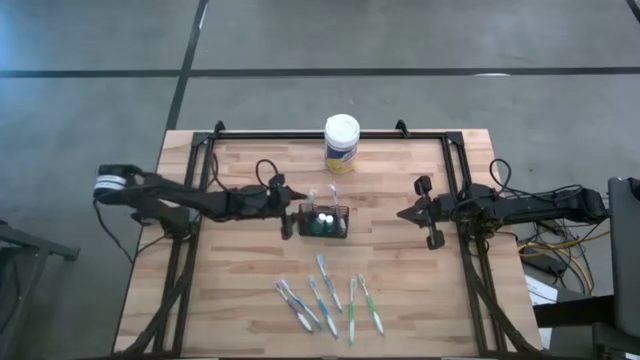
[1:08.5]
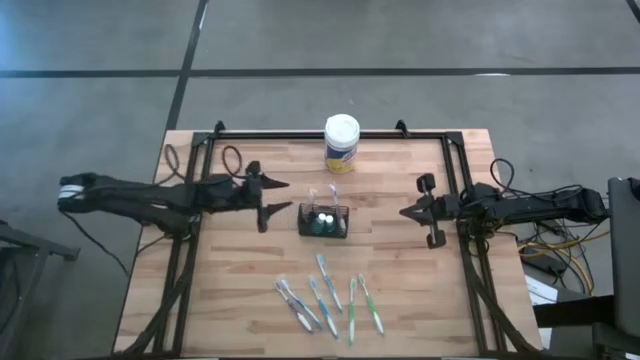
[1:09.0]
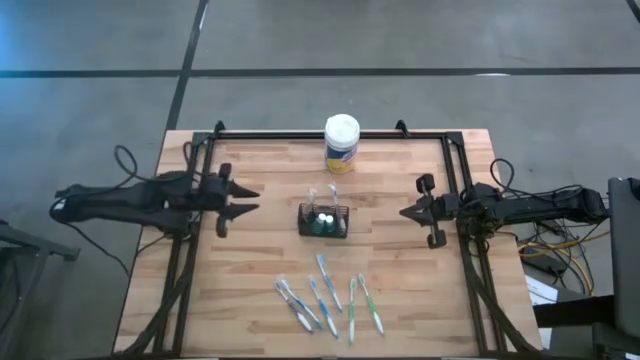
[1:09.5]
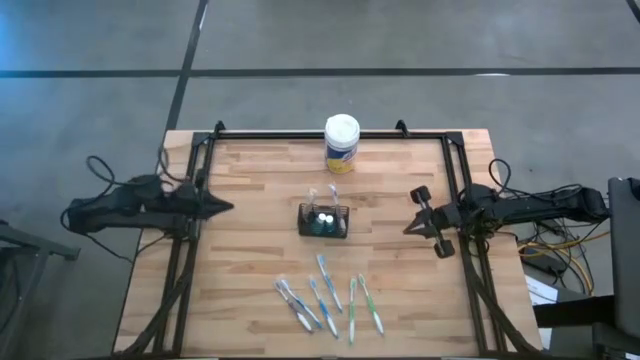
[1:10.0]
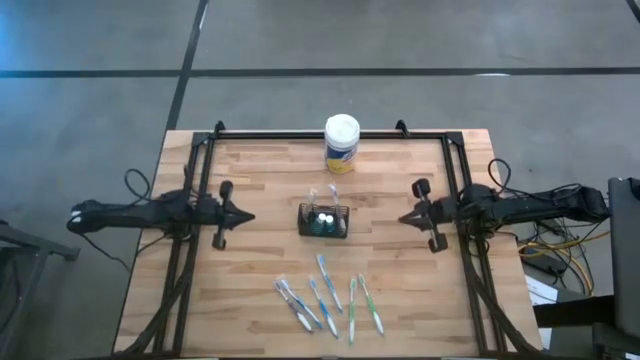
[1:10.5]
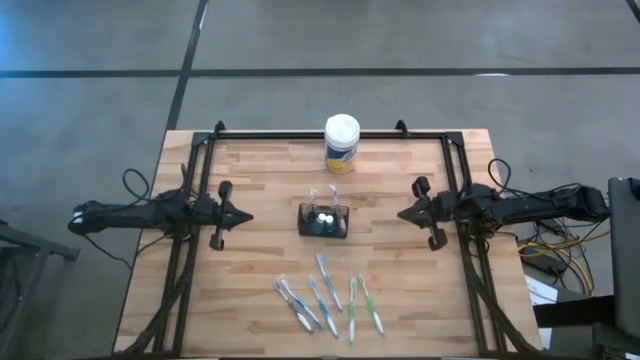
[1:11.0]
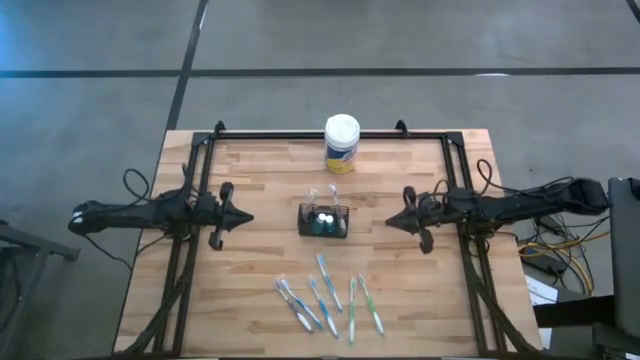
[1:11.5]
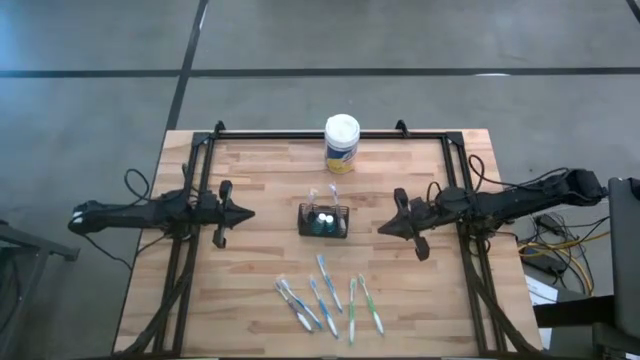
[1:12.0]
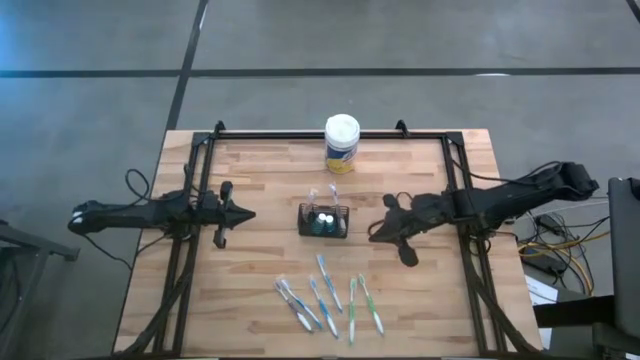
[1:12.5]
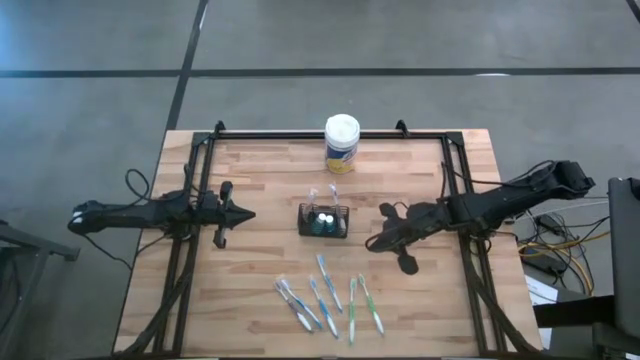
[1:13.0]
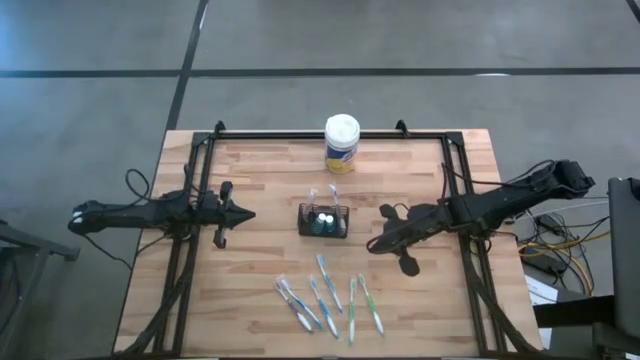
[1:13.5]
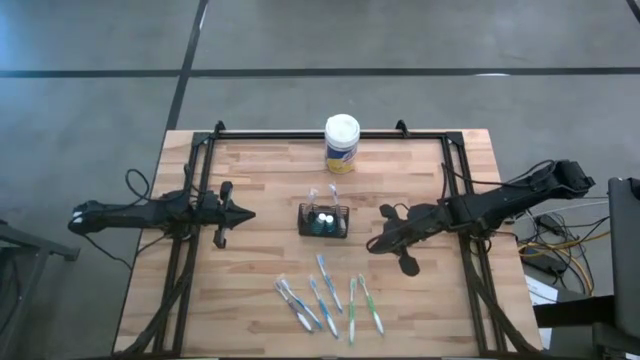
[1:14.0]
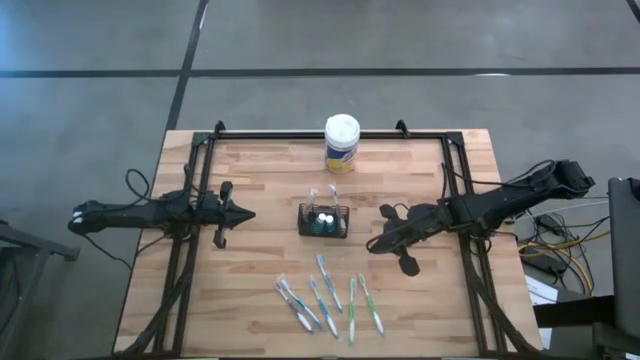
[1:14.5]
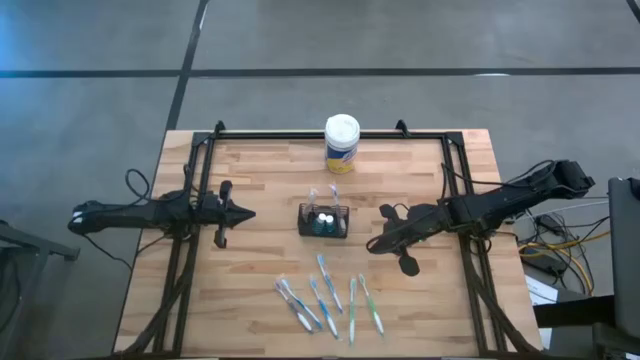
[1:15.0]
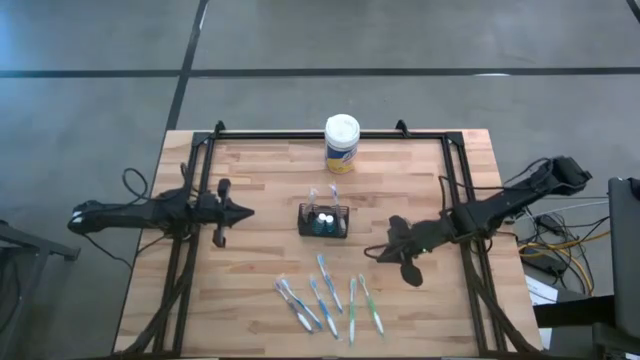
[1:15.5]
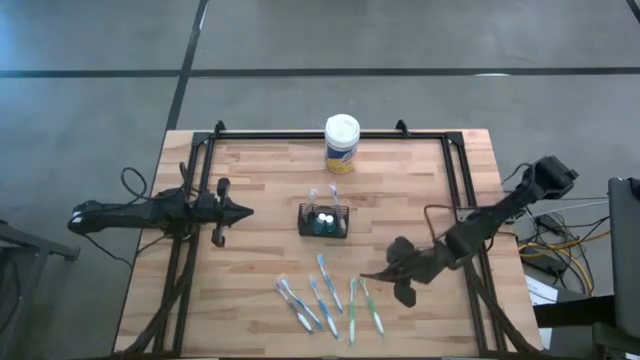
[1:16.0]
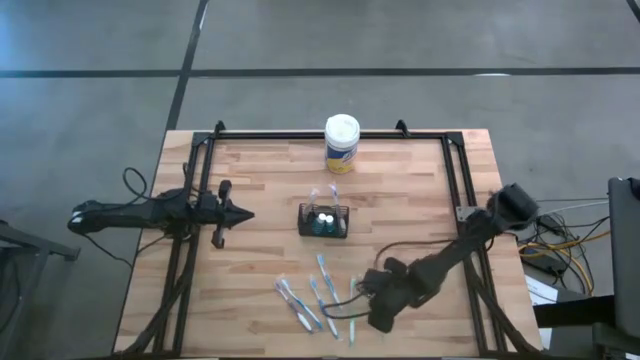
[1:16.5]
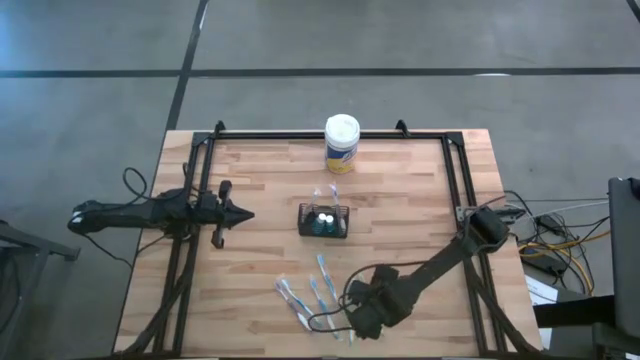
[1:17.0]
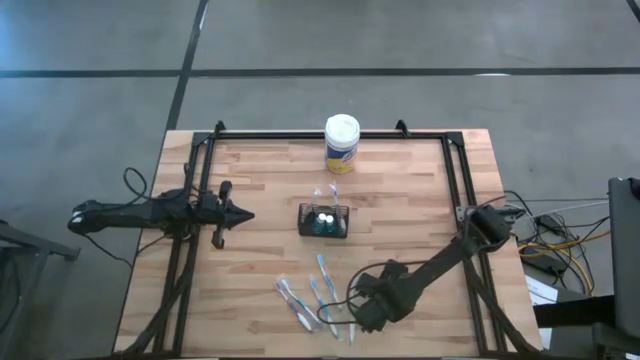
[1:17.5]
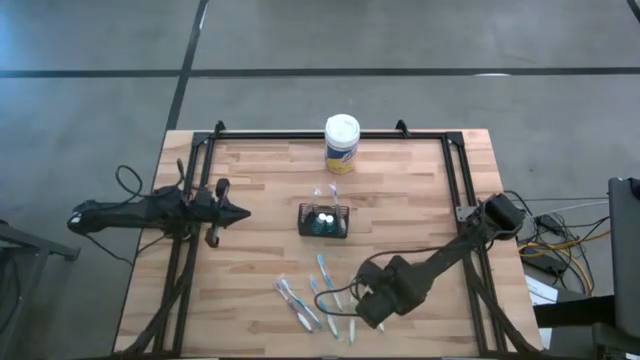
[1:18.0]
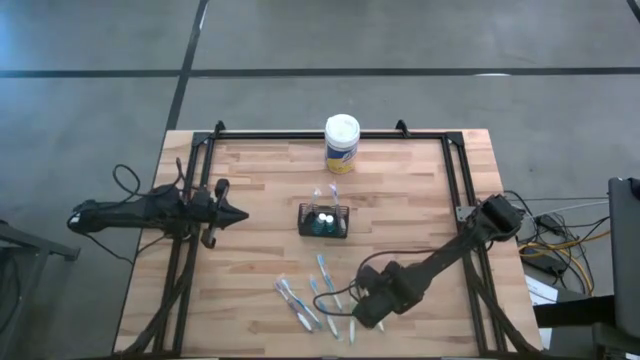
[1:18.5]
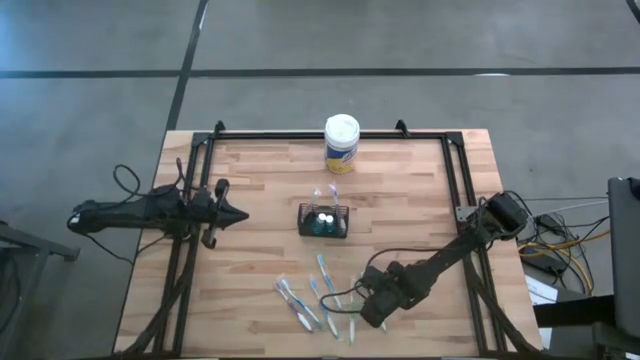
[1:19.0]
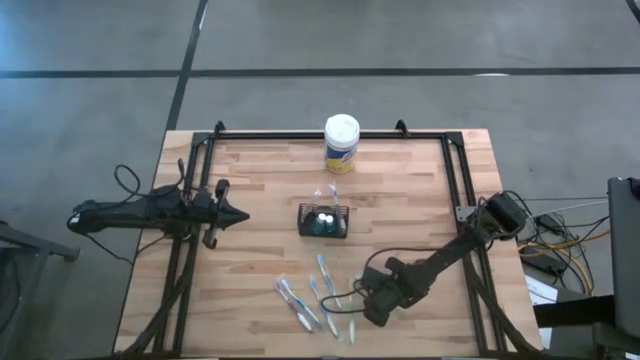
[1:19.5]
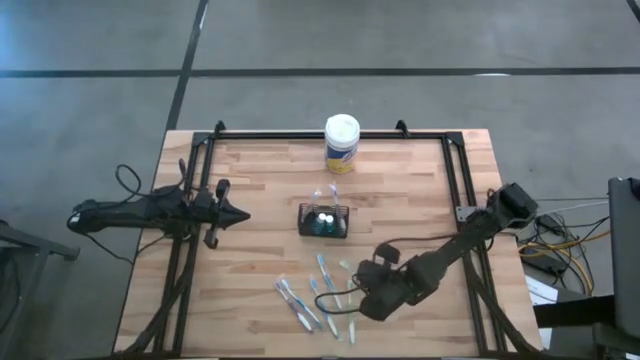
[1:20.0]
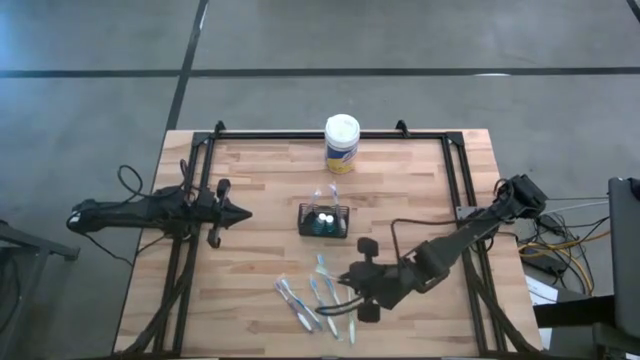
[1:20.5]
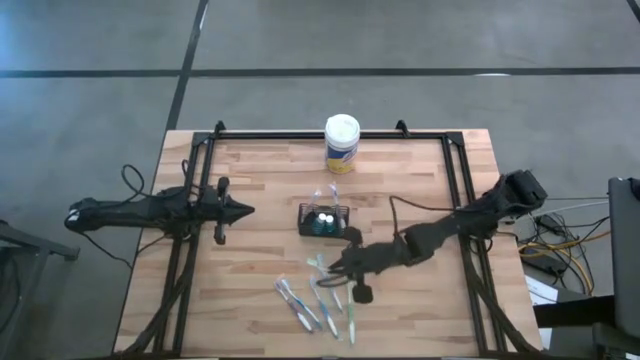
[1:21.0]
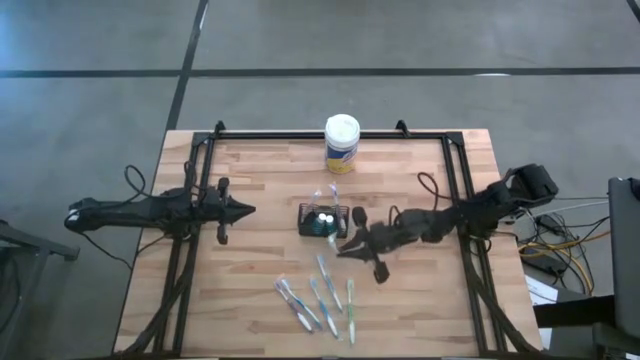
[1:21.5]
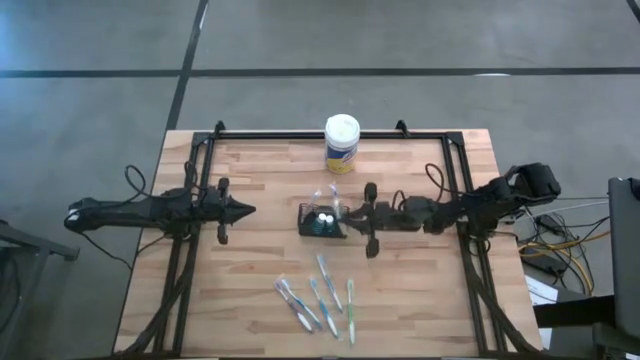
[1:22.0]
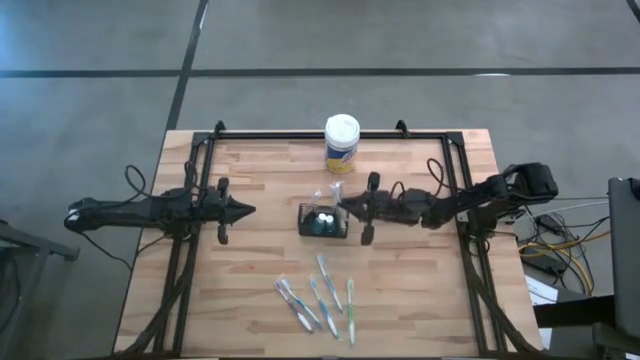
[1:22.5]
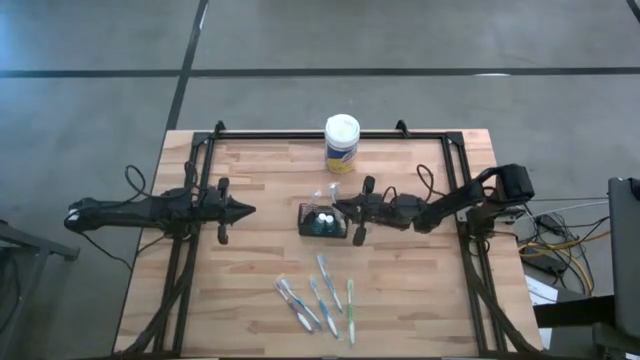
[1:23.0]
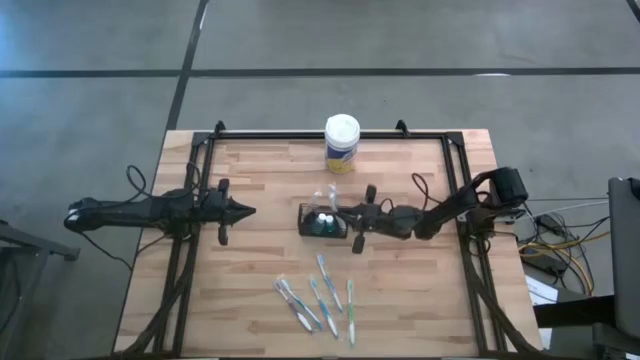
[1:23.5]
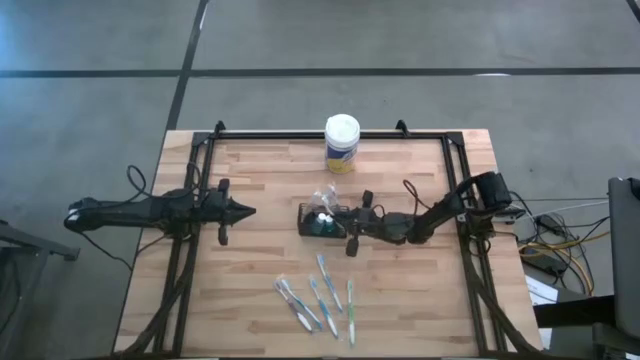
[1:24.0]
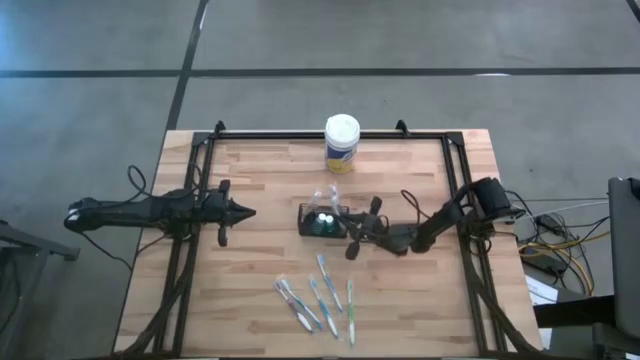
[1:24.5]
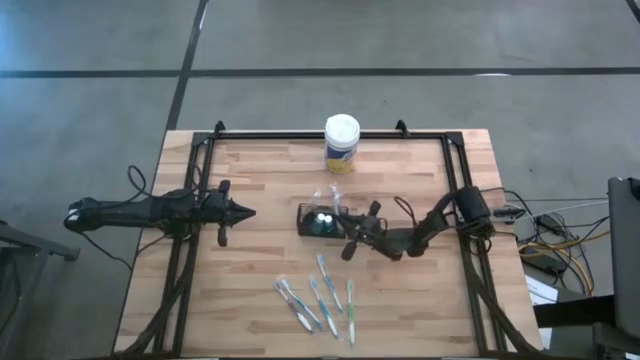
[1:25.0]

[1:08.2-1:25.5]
Task: Pick & Place toothbrushing station
Put the right green toothbrush into the wire organizer

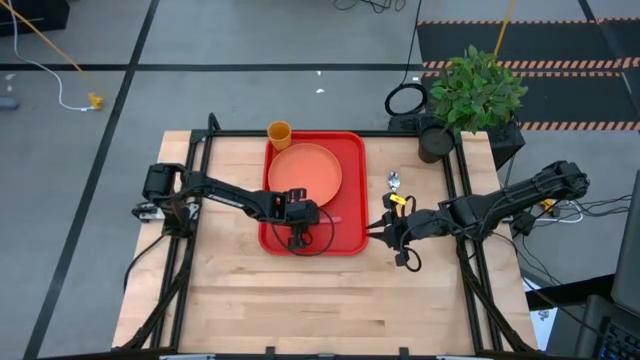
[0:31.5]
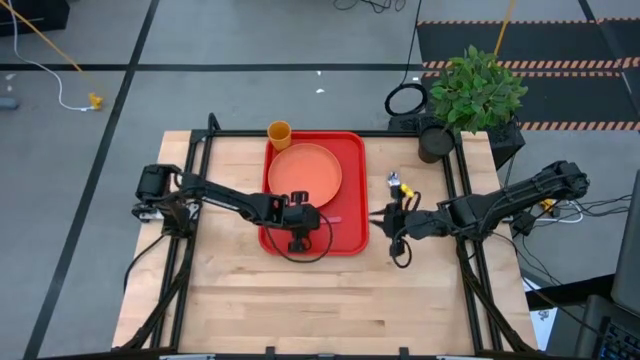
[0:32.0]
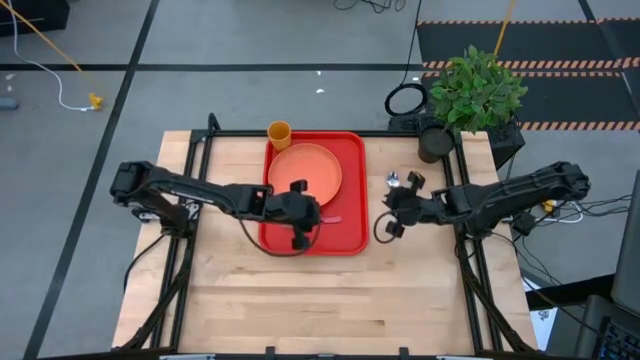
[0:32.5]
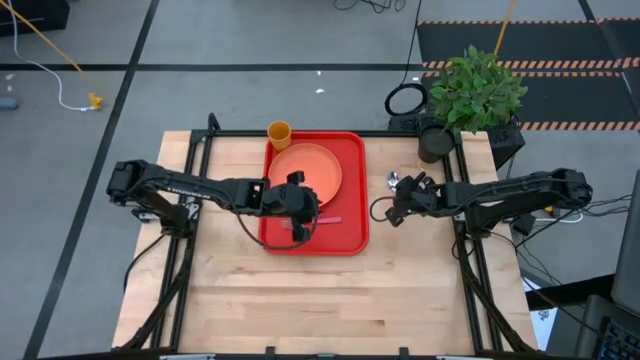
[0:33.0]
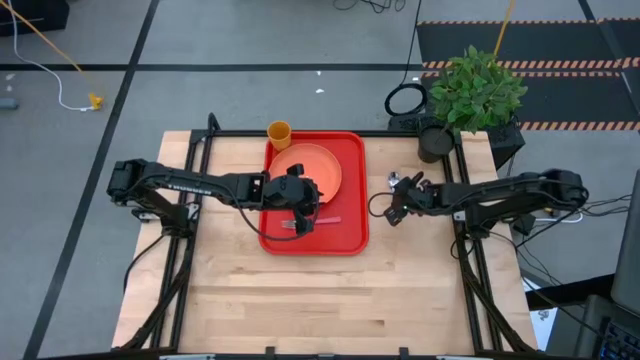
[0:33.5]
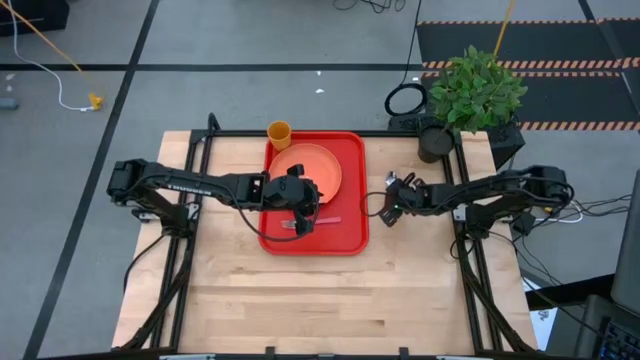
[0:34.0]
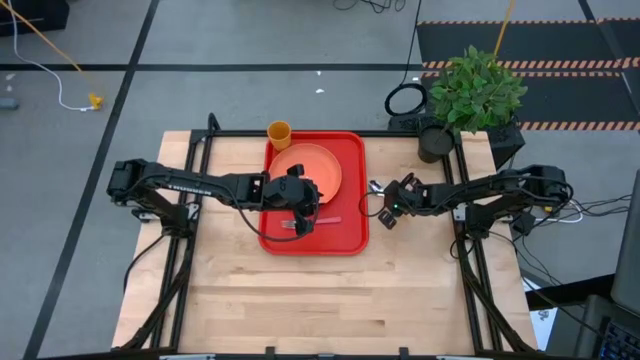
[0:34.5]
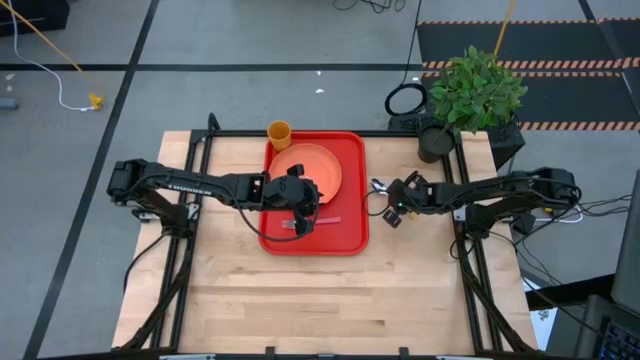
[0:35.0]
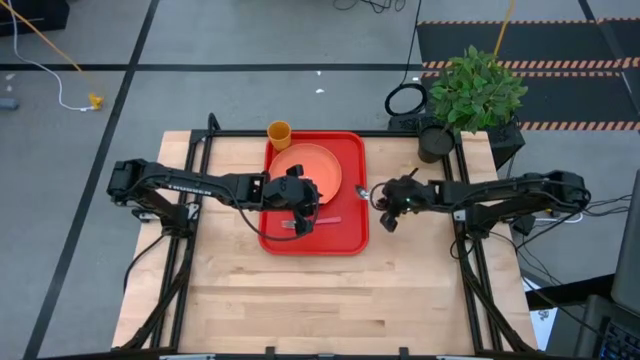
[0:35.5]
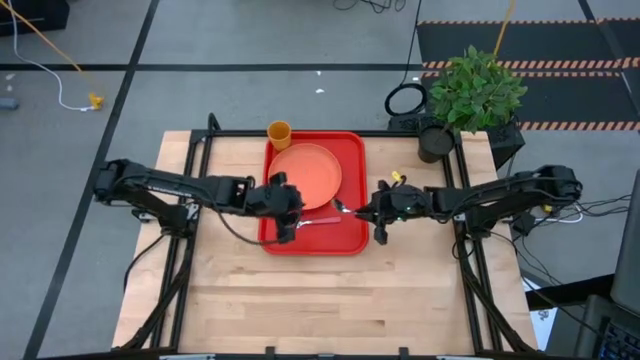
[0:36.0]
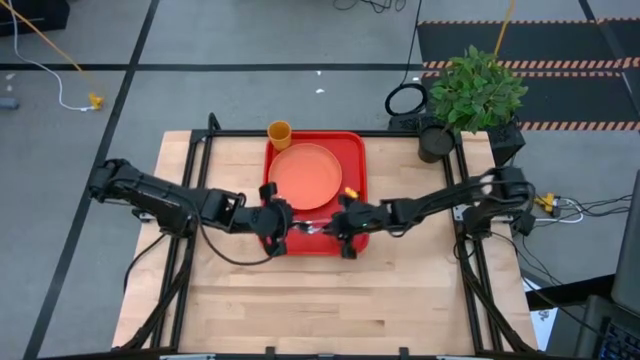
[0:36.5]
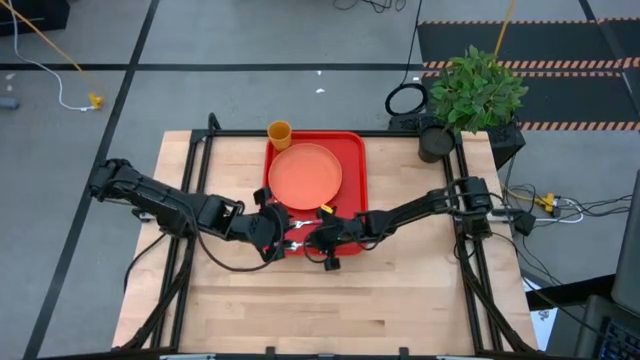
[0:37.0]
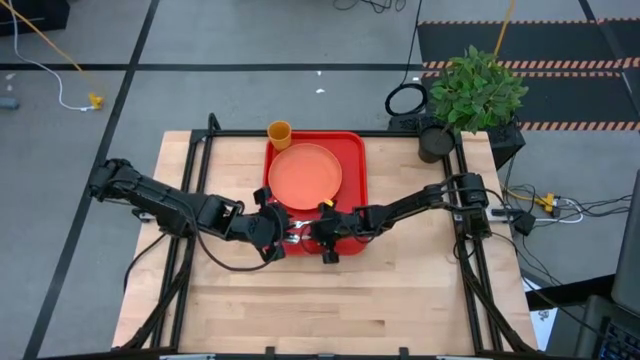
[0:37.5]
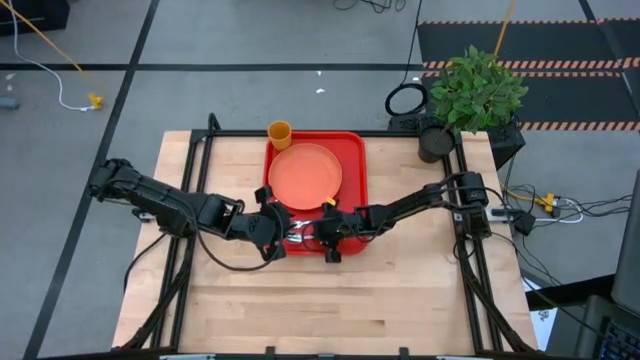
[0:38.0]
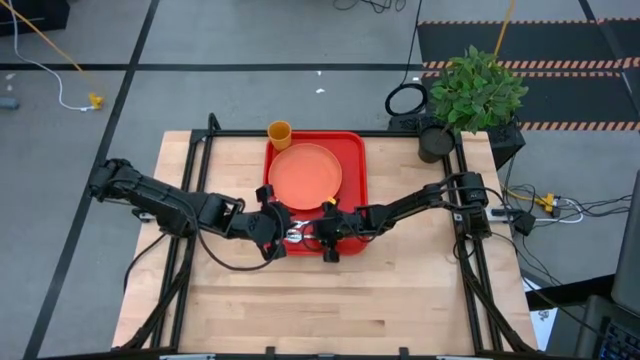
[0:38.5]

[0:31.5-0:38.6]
Task: Pick and place plate/cup/fork/spoon on tray
Put the yellow spoon on the red serving tray to the left side of the pink fork
